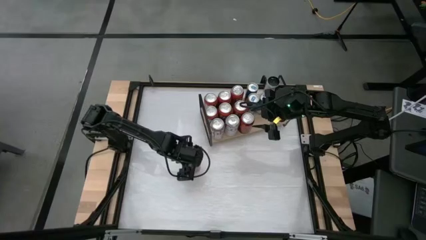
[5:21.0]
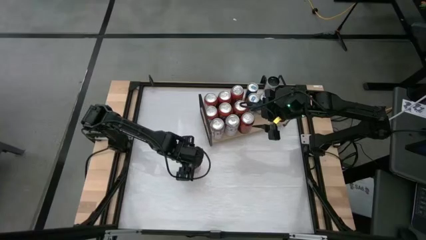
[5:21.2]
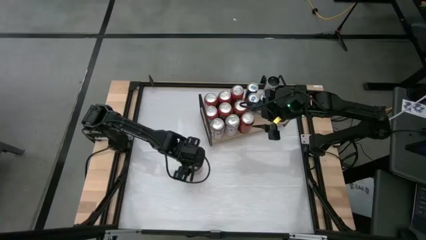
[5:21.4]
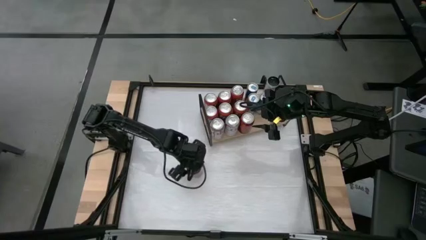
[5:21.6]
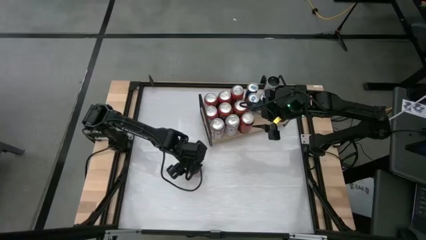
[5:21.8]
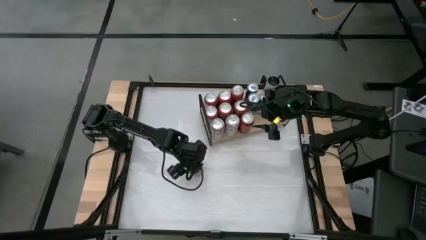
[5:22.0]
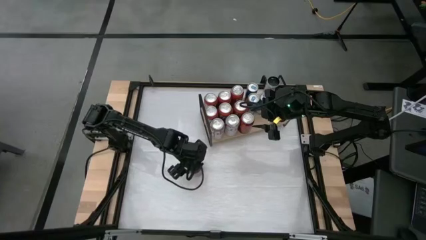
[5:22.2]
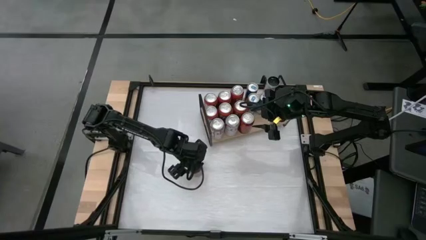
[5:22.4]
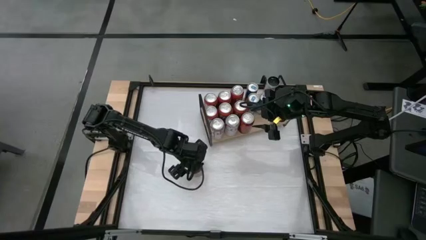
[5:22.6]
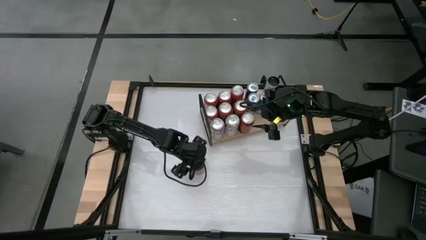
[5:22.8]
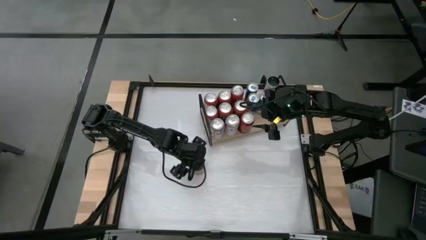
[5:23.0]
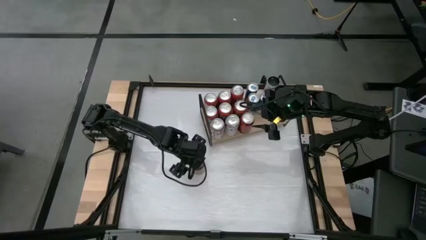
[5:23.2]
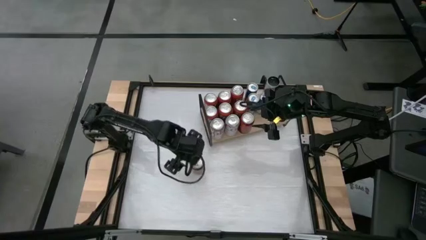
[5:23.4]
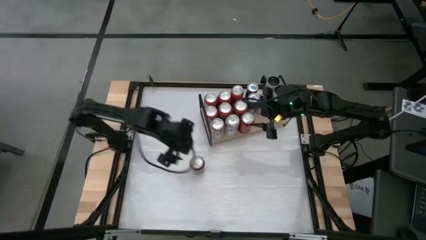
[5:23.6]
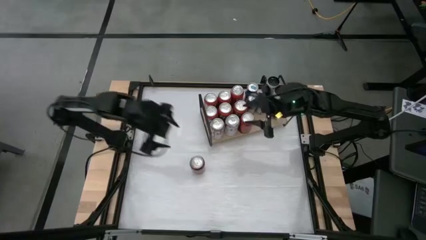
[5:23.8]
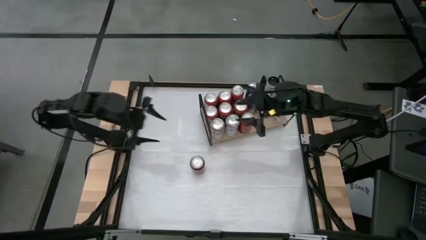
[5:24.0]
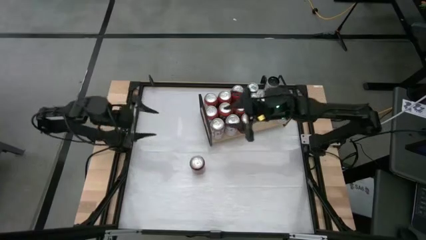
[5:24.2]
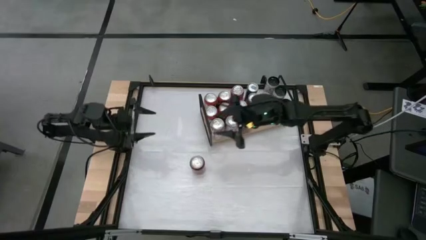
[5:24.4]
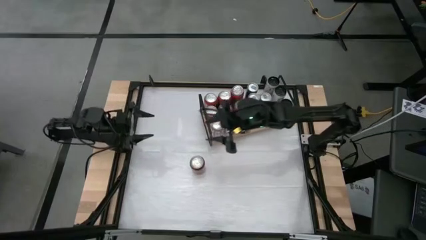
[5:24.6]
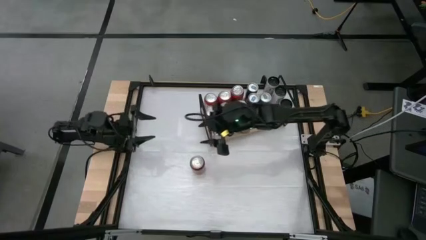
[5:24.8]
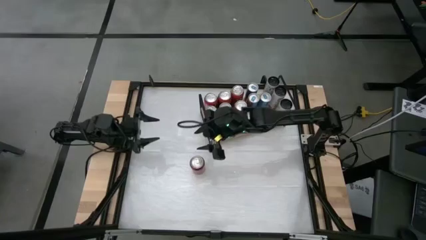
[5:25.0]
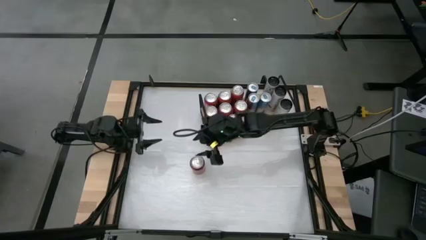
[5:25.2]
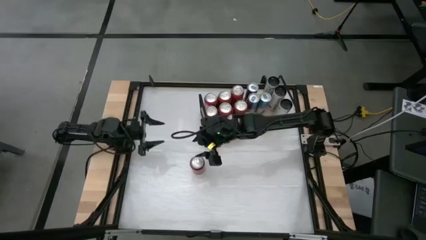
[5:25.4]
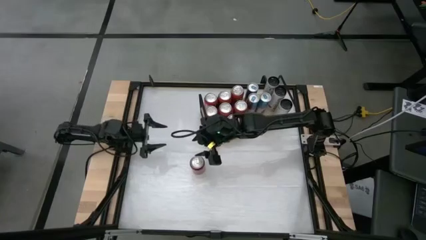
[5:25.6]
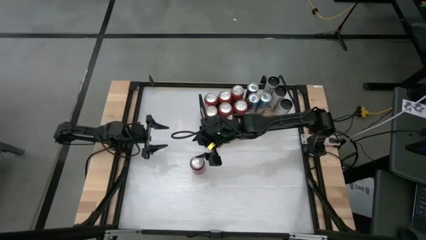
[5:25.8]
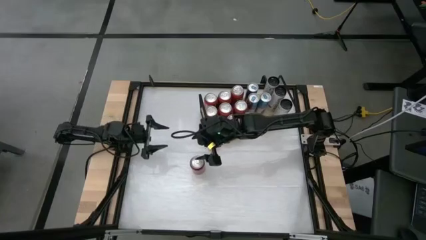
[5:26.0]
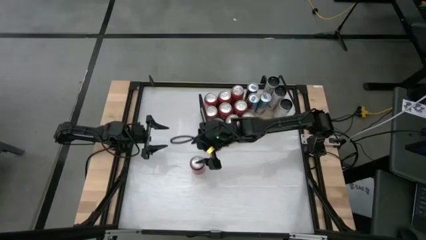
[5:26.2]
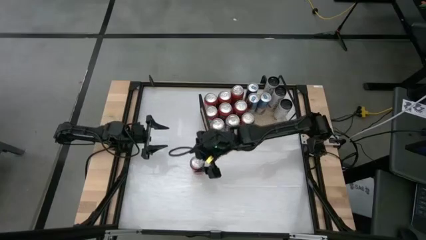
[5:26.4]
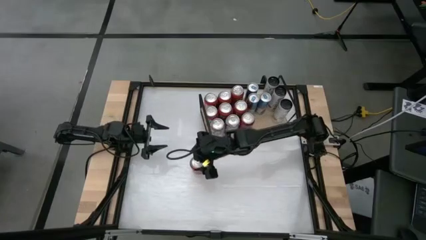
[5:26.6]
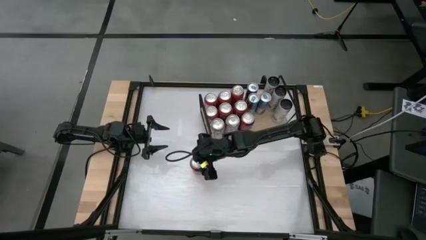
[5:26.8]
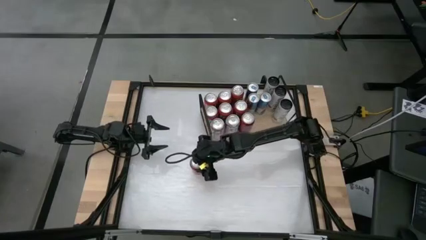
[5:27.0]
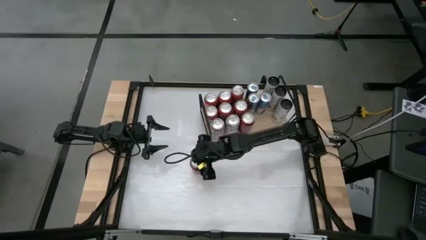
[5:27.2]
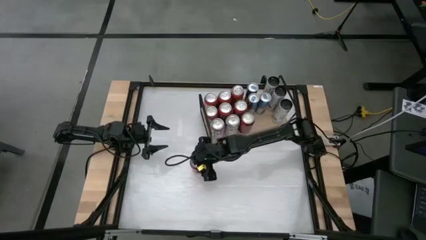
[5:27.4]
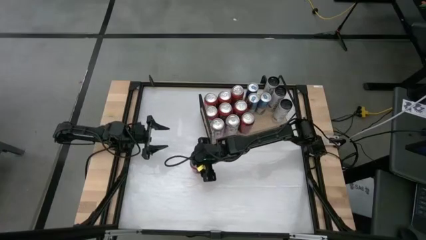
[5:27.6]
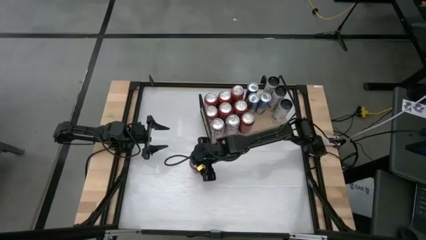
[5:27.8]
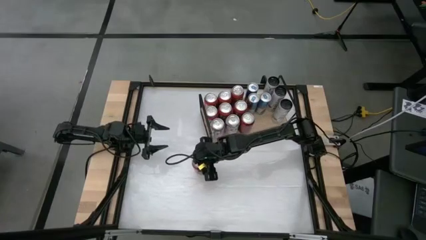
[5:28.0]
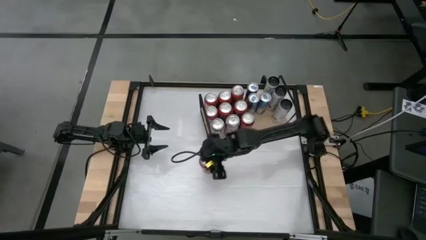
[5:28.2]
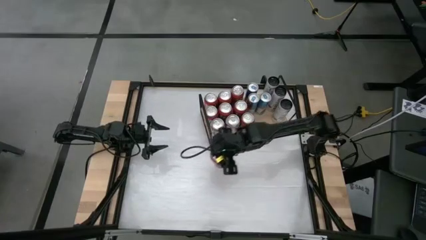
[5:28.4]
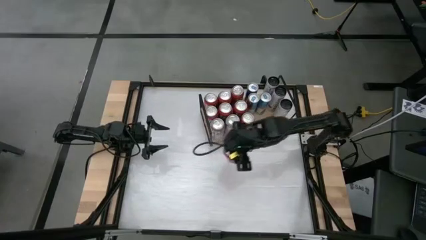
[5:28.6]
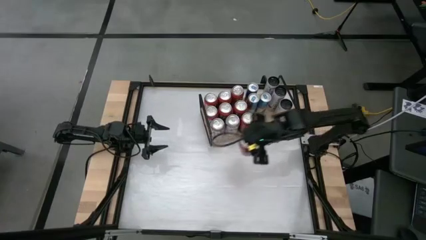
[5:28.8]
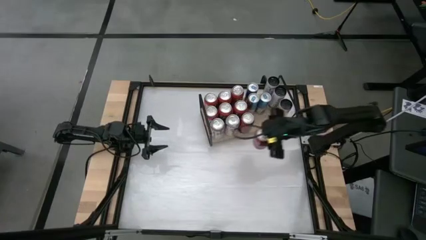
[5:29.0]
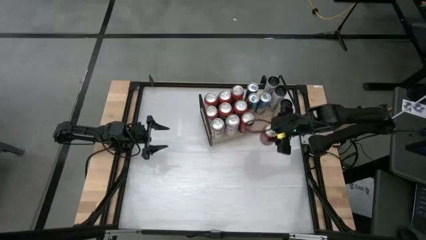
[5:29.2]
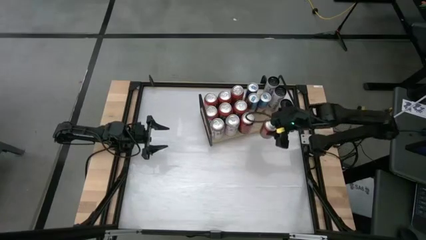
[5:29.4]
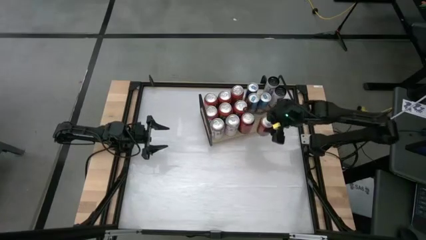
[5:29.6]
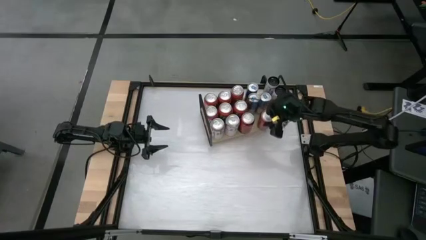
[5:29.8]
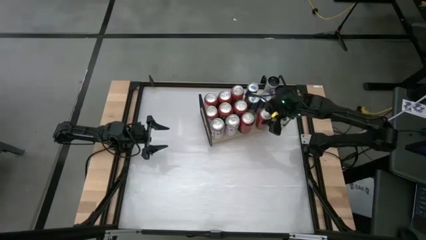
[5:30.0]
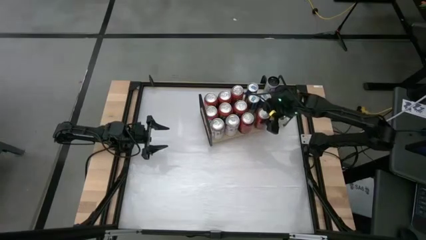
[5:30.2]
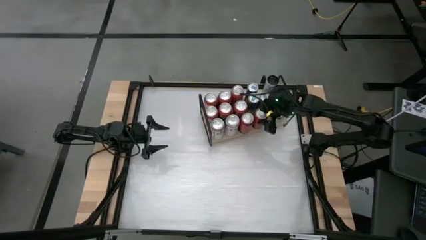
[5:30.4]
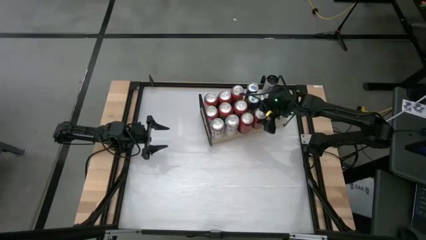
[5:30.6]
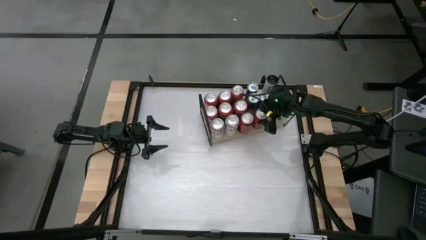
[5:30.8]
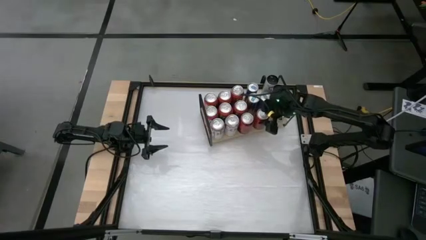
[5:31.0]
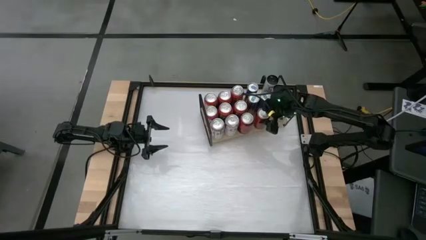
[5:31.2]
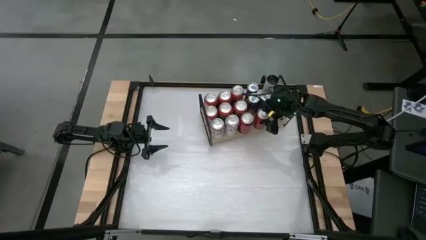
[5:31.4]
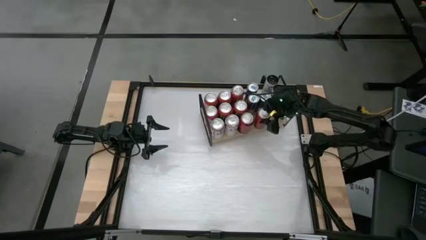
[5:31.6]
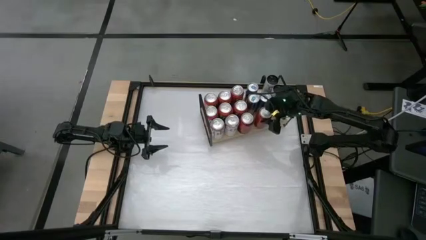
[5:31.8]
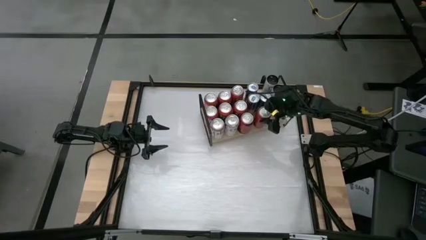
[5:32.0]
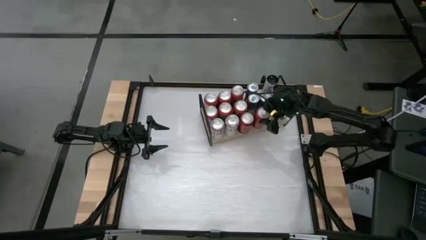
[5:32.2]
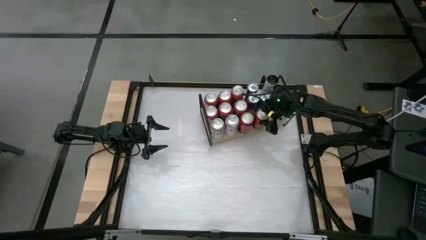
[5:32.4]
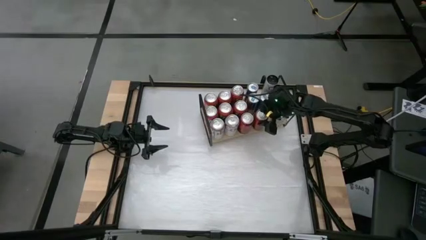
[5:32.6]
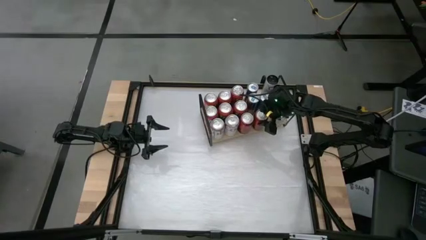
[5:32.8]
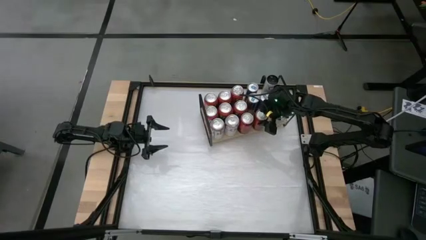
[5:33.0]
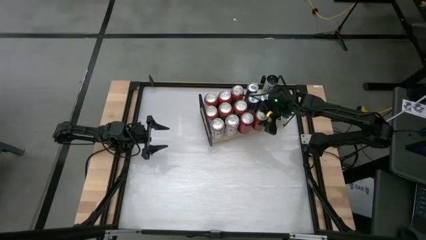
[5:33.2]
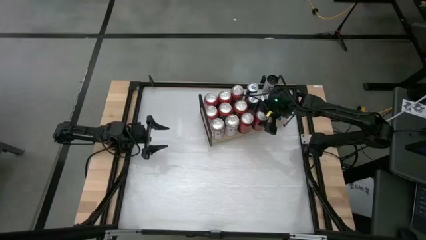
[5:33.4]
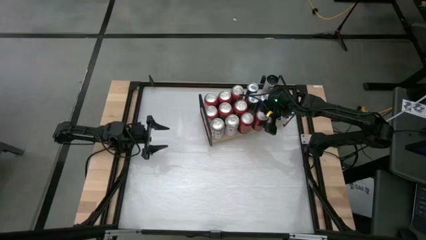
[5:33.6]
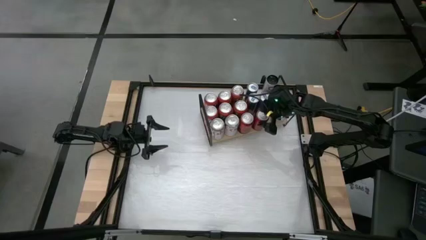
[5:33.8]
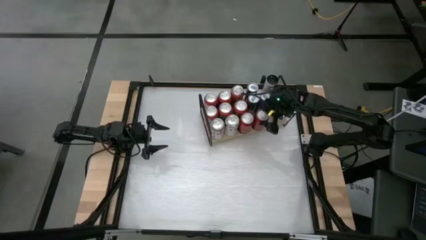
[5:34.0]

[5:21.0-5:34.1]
Task: Place canned beverage on shelf
Put the red soda can on the shelf
